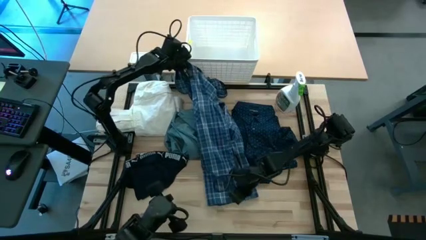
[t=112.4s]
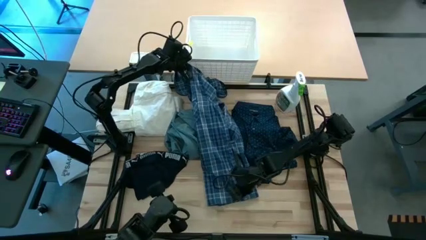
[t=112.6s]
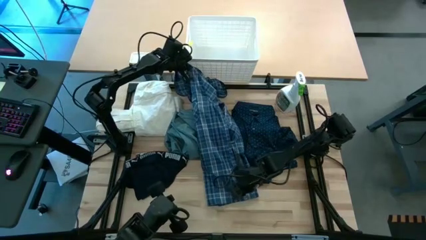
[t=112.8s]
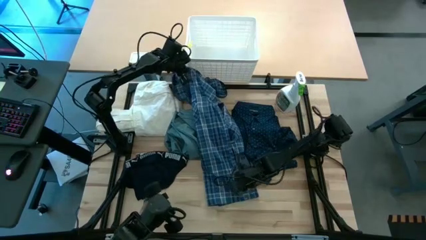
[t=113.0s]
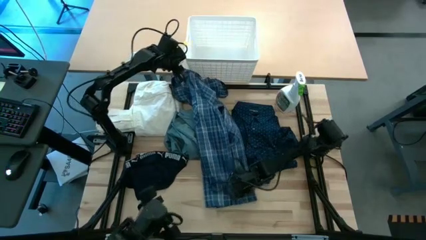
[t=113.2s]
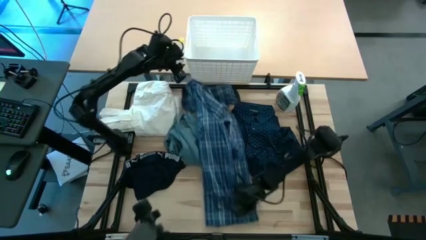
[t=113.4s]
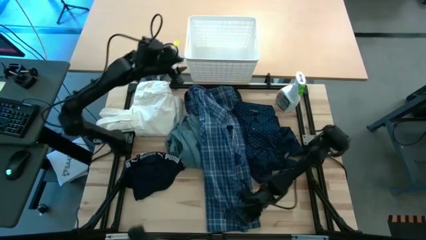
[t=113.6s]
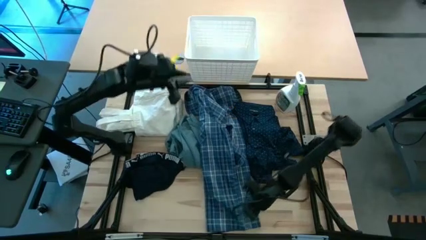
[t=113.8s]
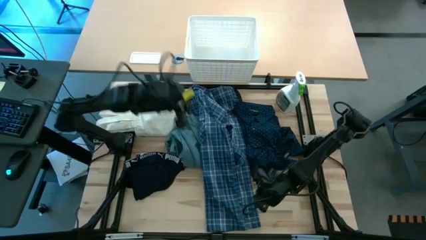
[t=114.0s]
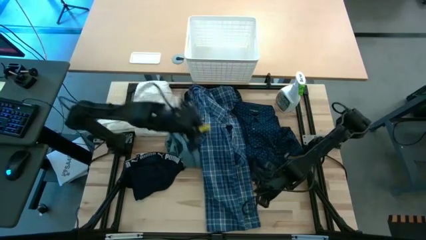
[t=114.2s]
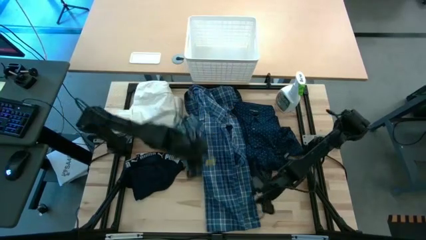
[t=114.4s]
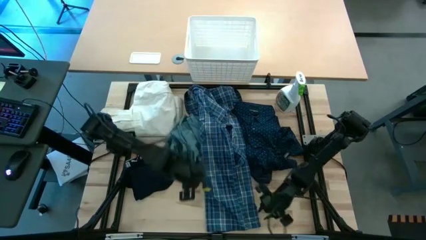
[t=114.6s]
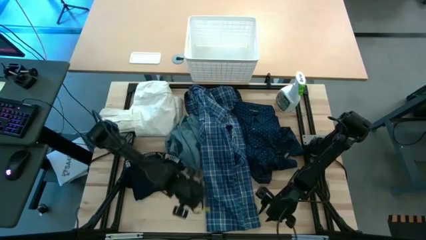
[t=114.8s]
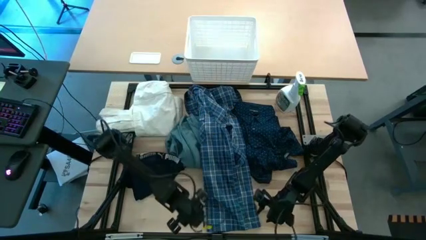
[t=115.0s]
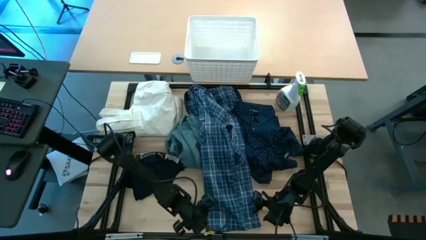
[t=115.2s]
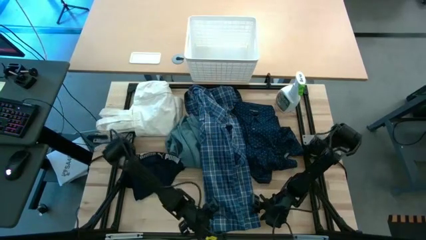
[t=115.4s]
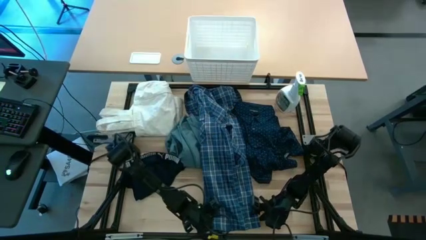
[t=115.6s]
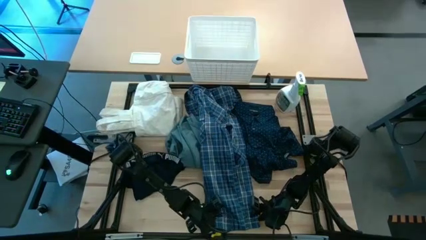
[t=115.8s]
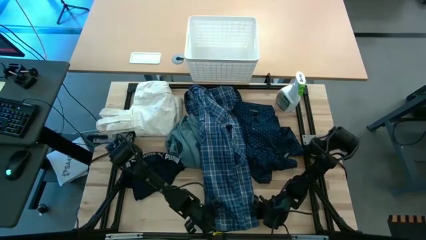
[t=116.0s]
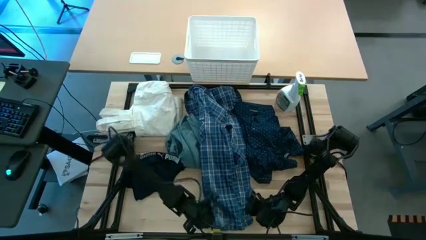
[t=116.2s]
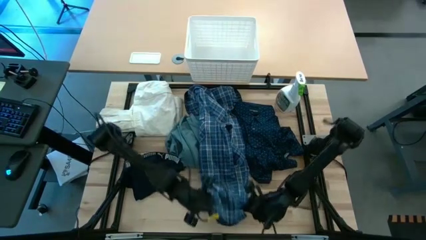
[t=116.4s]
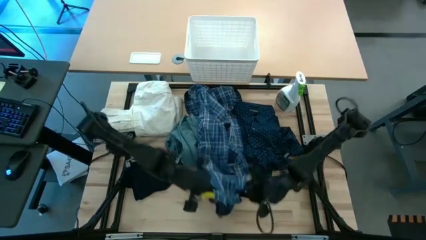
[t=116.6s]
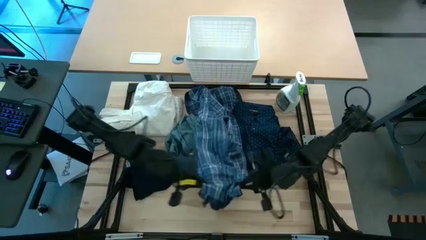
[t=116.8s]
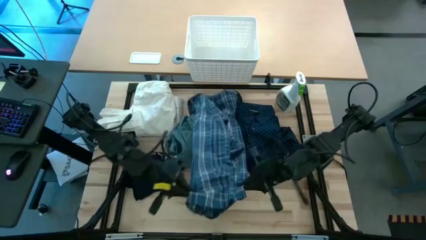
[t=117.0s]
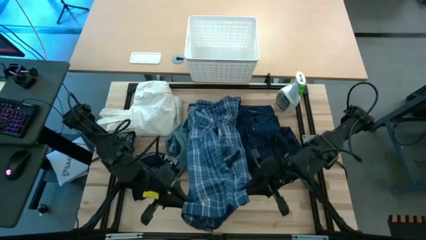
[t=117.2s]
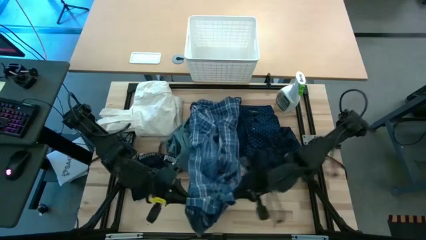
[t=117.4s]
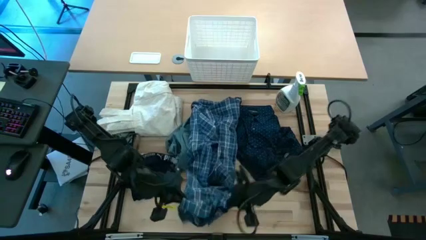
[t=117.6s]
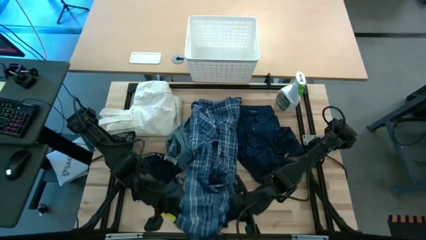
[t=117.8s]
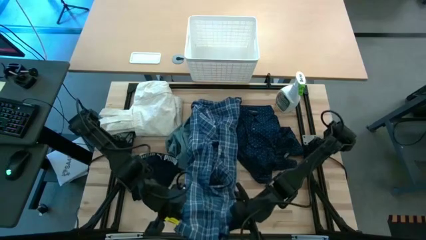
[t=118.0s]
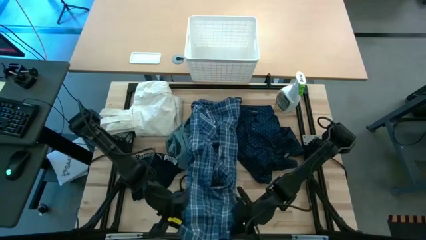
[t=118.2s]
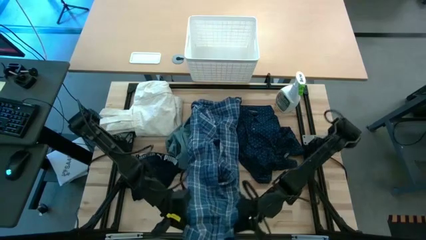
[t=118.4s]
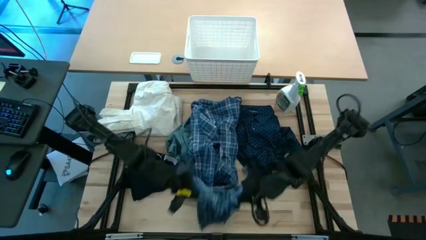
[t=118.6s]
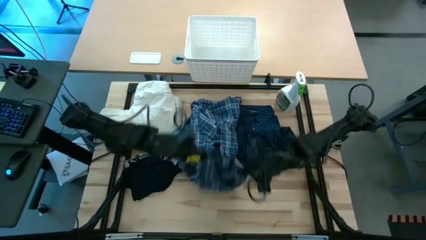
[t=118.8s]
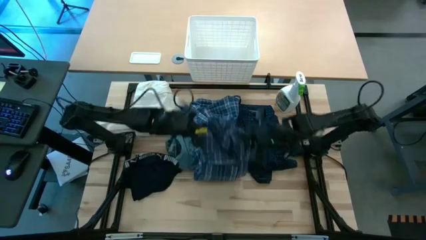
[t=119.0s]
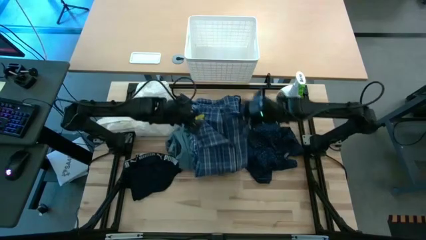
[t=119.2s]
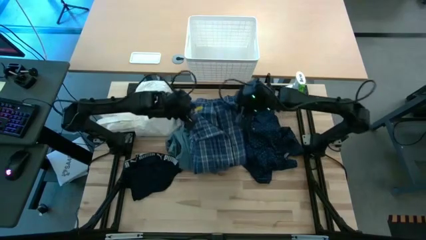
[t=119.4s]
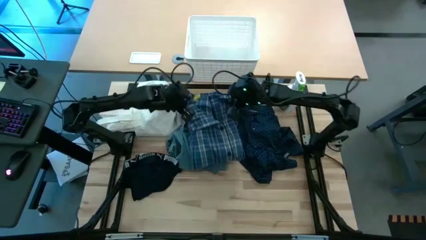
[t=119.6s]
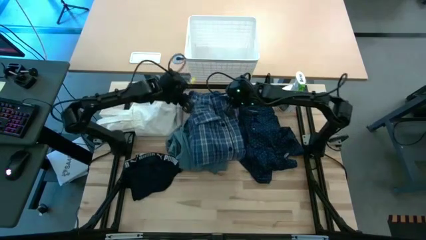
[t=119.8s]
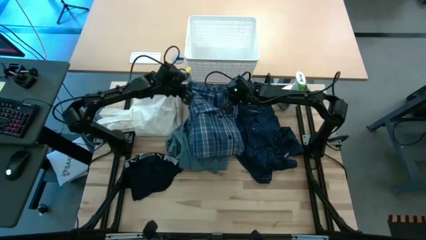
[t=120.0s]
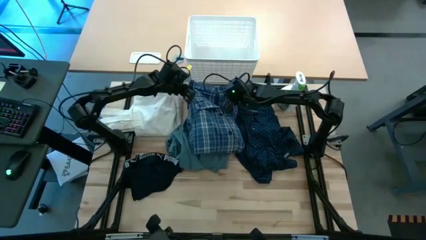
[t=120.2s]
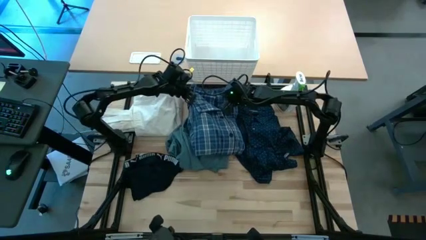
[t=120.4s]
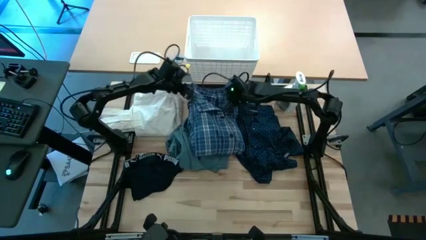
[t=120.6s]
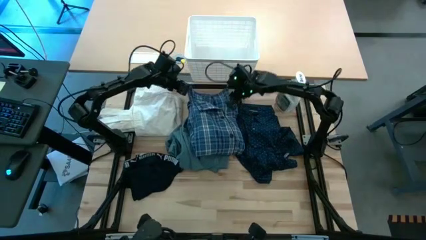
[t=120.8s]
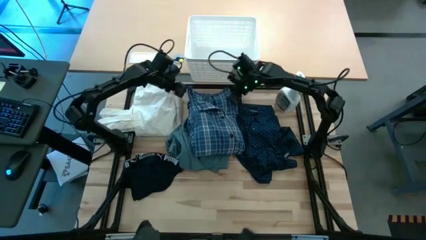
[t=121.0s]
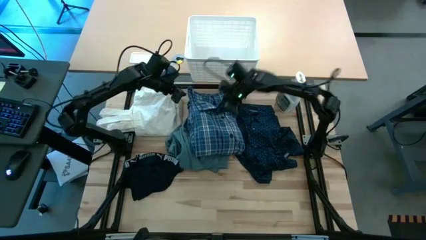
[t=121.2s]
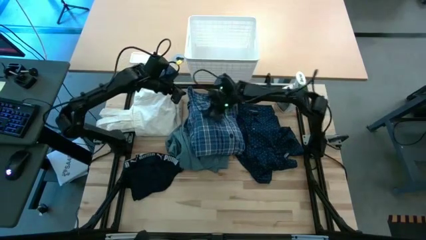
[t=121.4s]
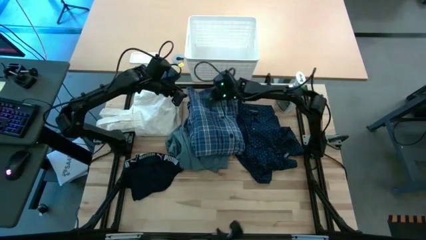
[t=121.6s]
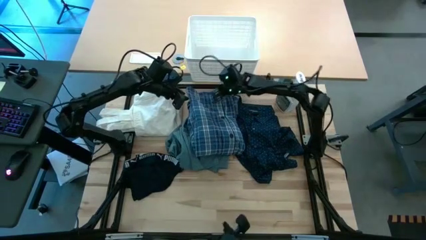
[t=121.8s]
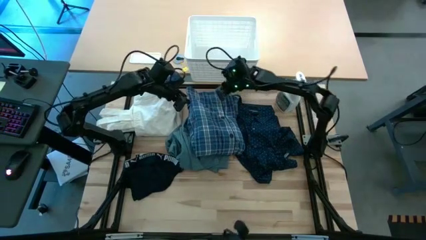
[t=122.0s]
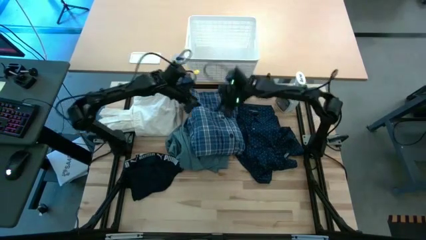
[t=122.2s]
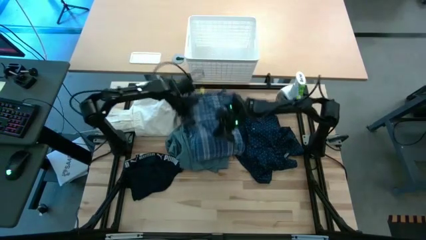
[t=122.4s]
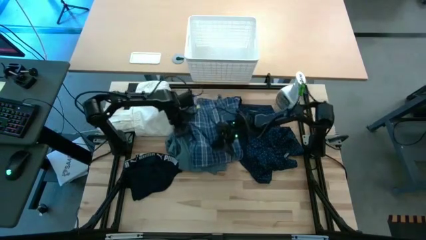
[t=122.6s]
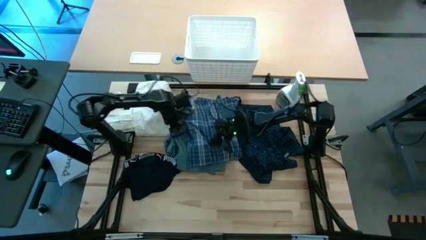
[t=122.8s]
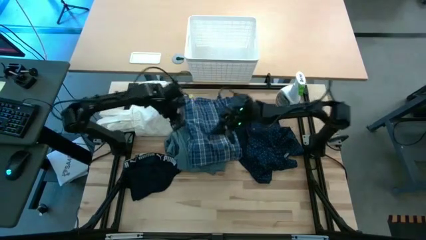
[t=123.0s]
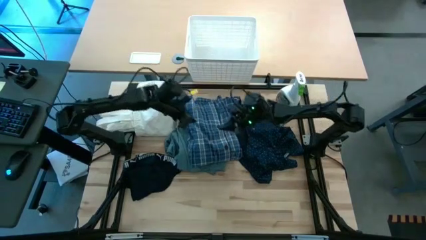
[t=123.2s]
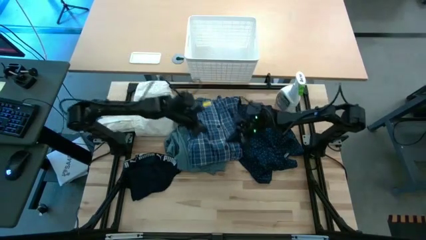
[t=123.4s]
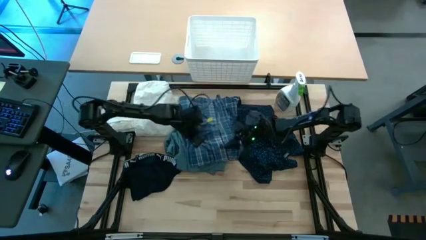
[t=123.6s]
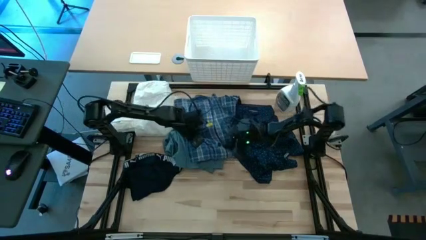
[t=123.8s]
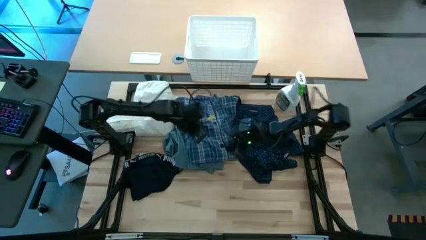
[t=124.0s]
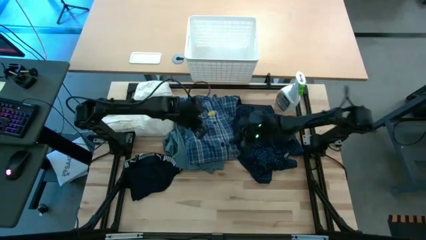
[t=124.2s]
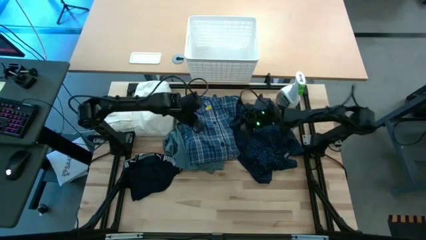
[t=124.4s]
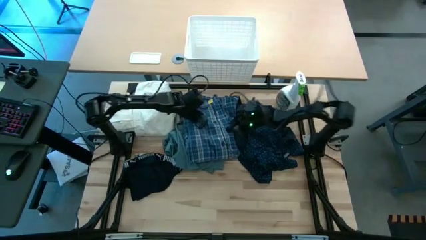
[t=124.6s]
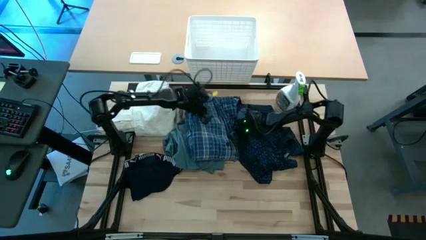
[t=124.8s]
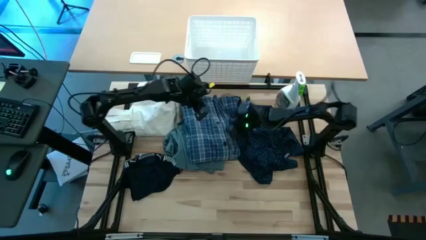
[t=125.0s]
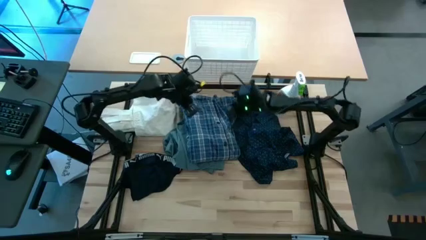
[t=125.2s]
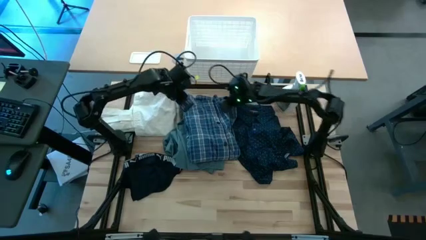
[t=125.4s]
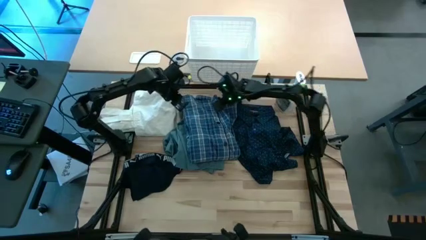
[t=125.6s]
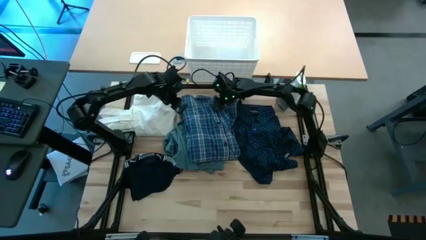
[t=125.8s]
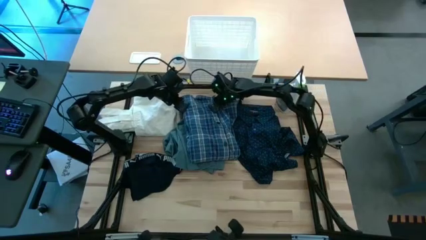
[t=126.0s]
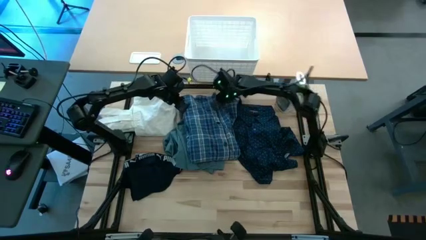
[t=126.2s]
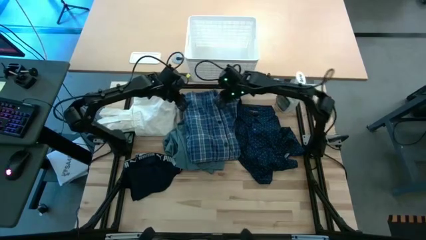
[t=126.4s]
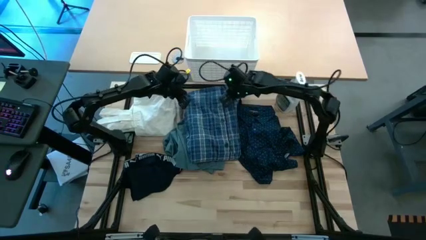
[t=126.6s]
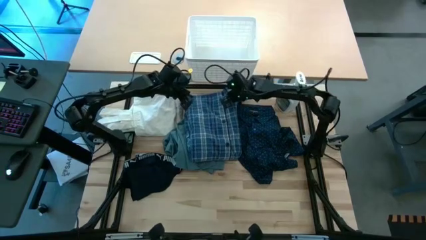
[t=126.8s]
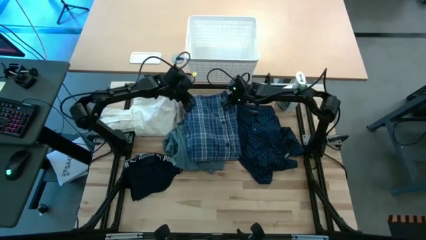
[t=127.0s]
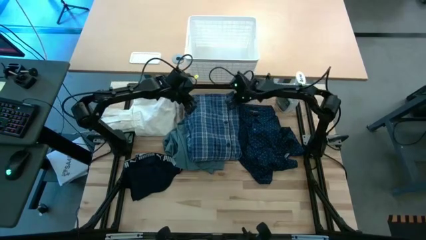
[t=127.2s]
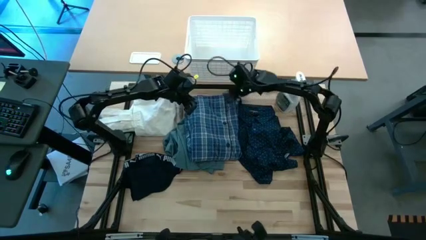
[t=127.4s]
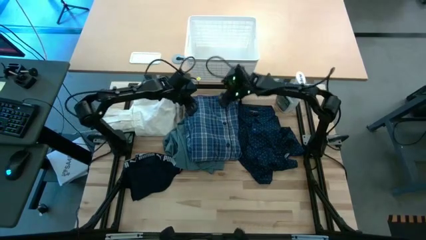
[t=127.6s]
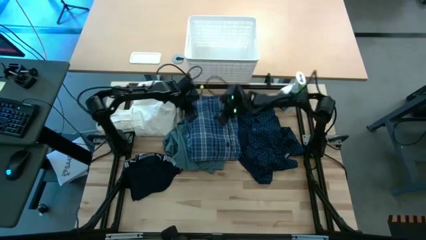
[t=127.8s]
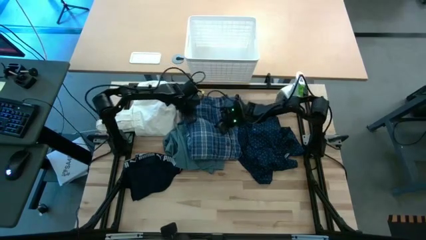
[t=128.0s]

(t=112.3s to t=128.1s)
Fold the checkered blue polo
